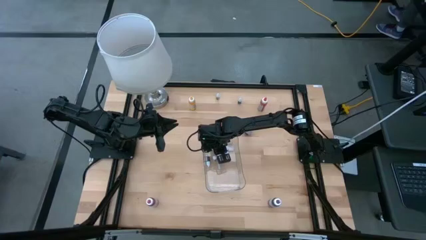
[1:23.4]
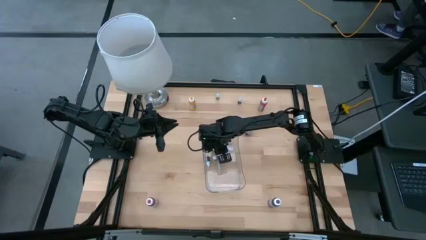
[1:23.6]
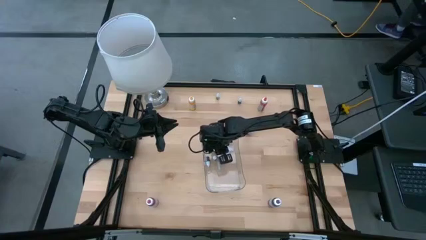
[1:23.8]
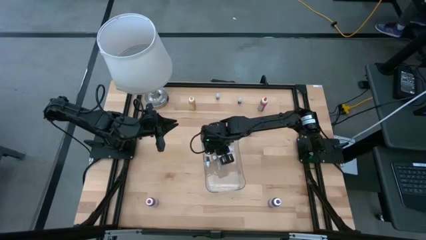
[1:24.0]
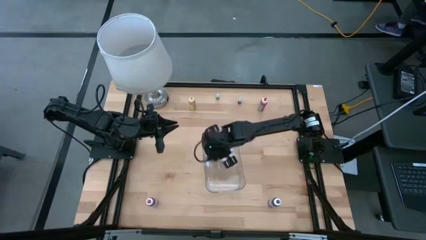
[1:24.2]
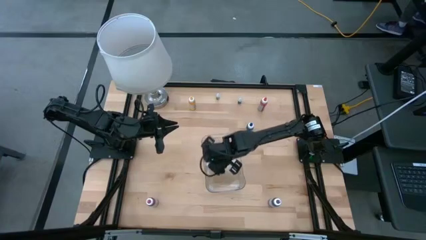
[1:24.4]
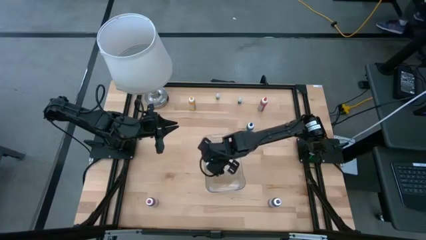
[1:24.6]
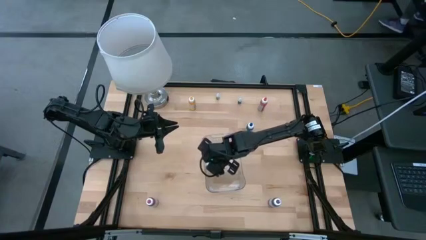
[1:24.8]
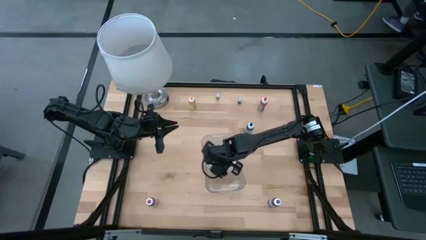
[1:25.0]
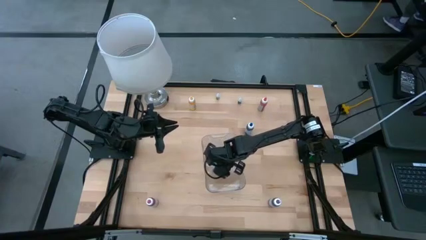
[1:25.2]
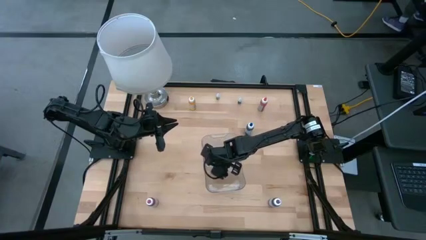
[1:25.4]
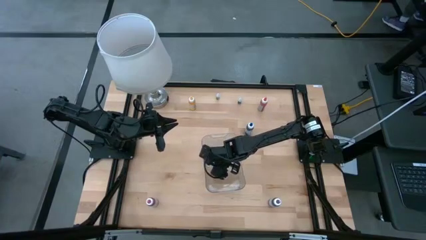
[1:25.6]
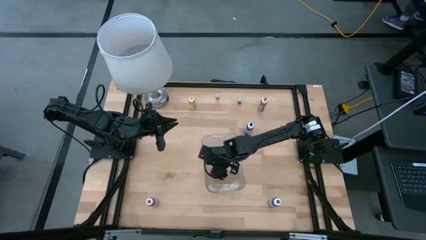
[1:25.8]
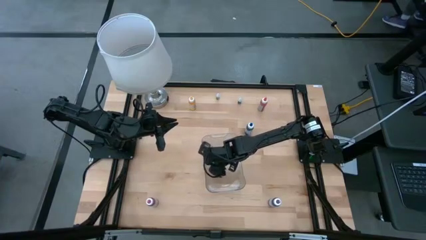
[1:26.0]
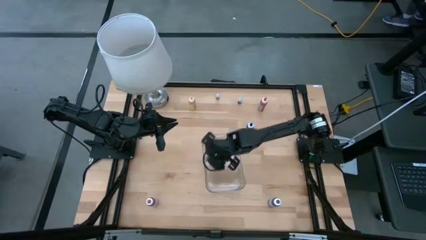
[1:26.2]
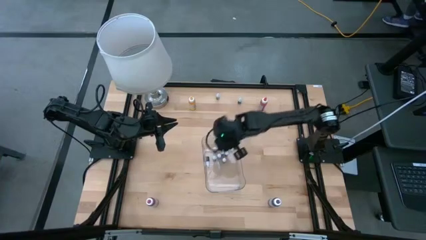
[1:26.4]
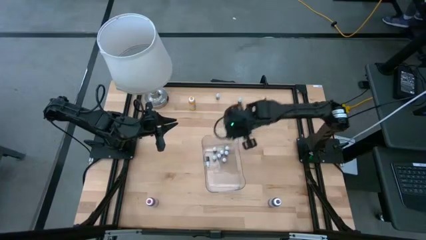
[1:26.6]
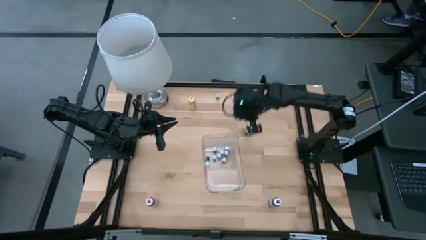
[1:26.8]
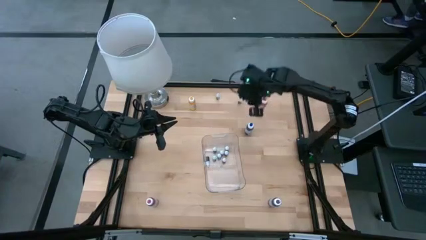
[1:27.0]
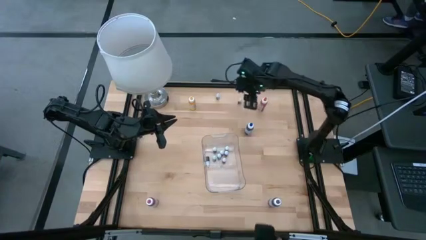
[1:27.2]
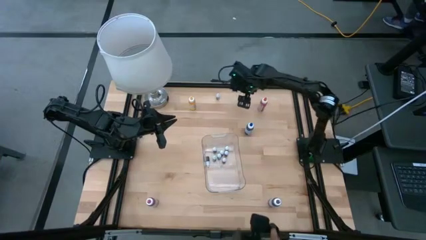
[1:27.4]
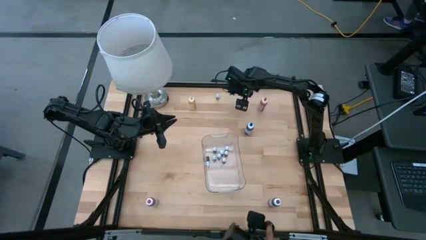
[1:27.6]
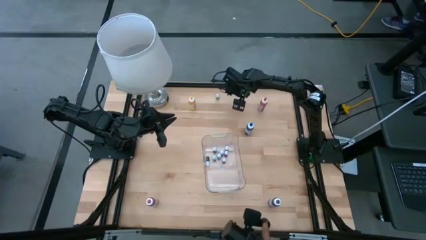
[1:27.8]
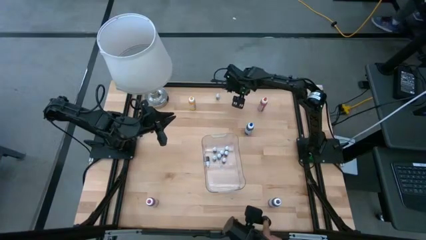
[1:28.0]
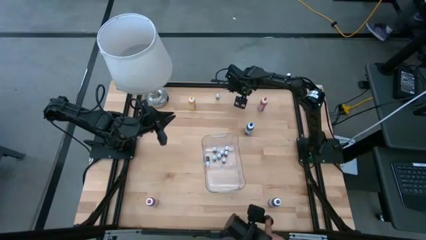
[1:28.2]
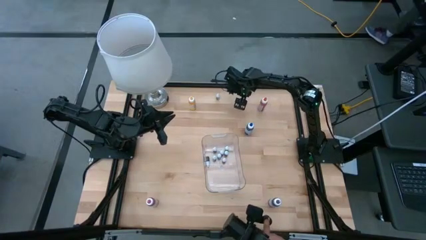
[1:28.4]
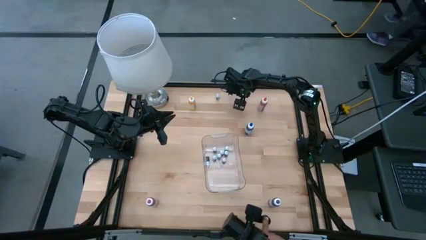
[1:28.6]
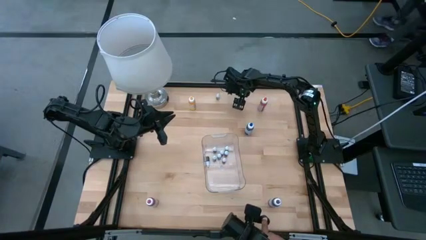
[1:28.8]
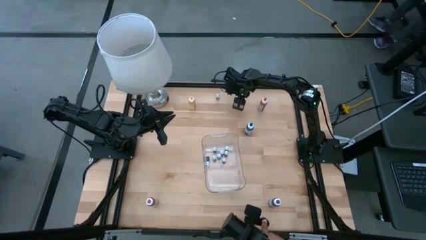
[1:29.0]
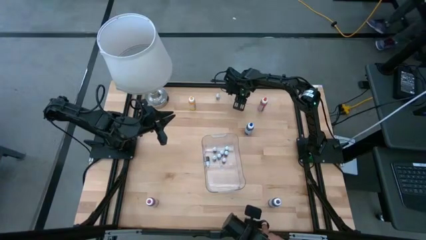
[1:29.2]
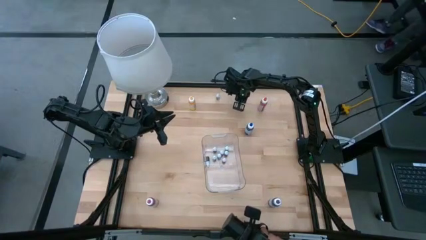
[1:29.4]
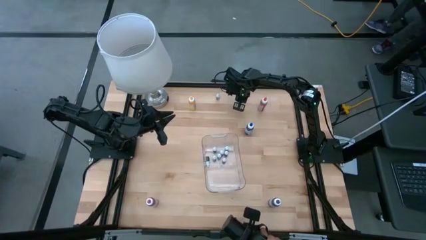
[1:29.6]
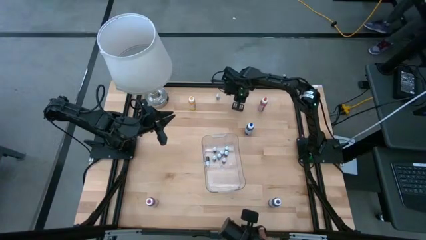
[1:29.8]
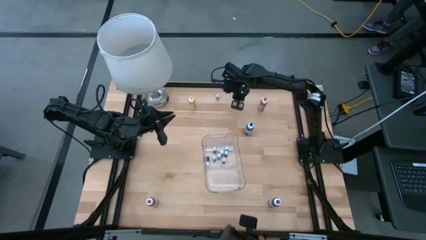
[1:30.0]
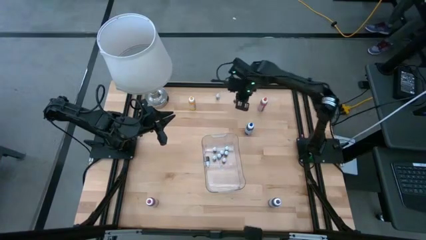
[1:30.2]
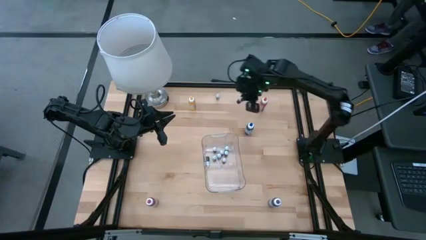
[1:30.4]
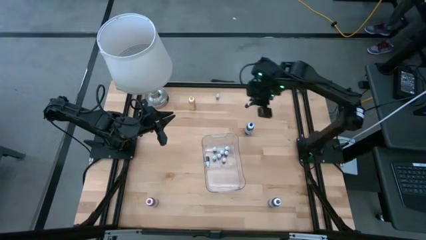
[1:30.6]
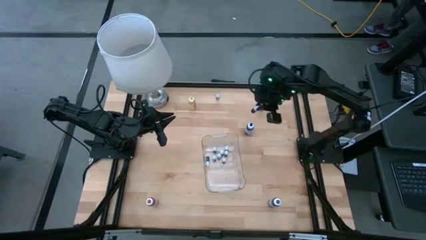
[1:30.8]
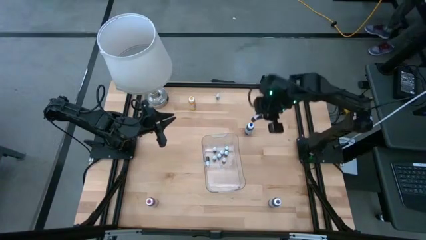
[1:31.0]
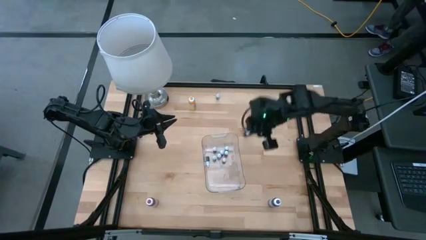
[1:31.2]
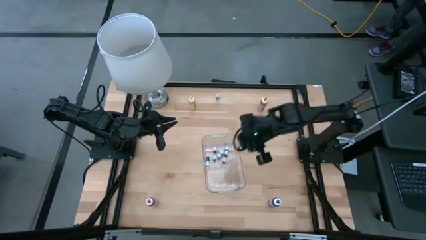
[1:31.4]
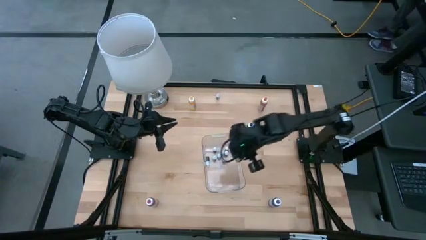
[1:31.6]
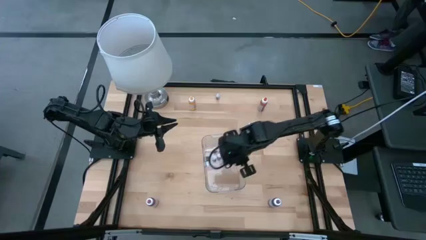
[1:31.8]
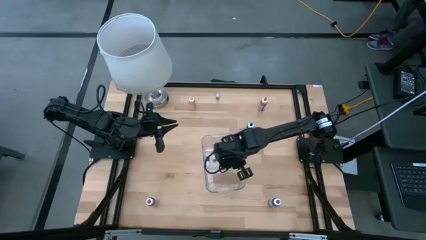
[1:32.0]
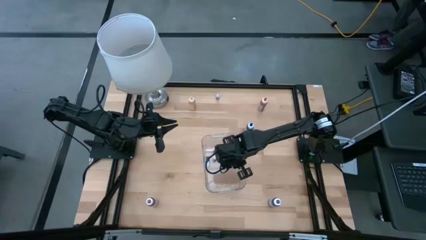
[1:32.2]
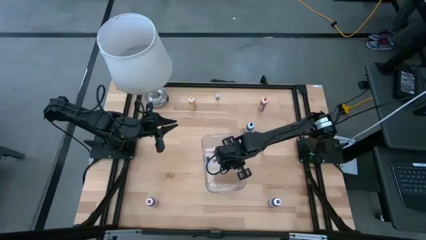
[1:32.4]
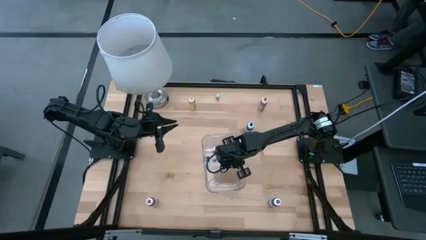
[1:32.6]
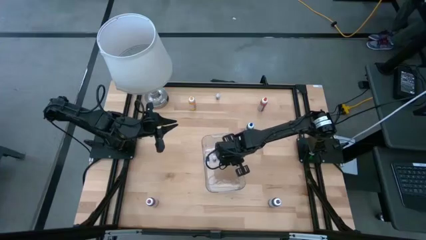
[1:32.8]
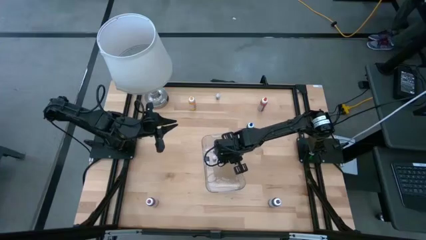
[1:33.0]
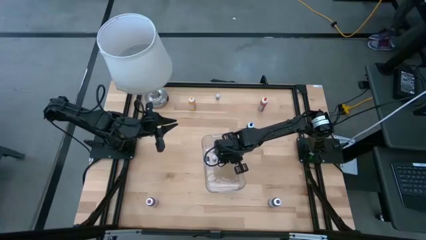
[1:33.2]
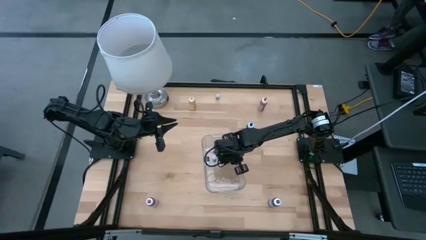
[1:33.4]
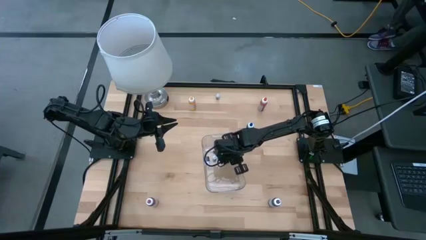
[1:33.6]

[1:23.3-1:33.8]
Task: Pick & Place food coloring
Put the small blue food coloring bottle into the transparent container

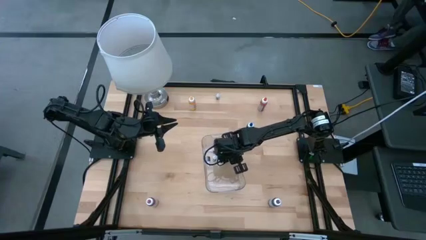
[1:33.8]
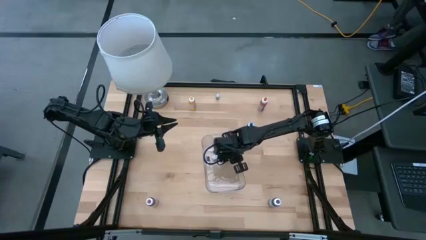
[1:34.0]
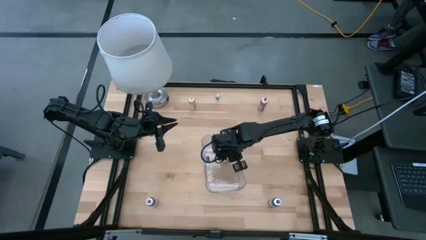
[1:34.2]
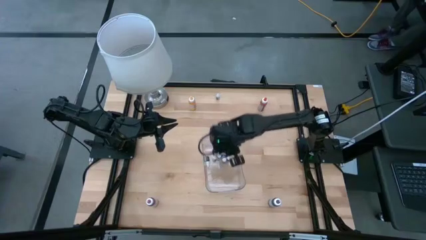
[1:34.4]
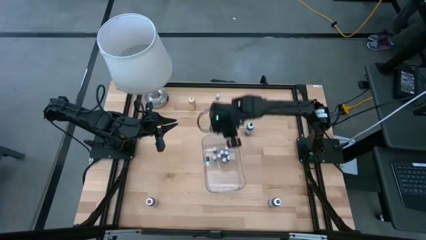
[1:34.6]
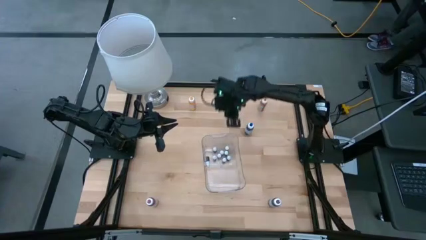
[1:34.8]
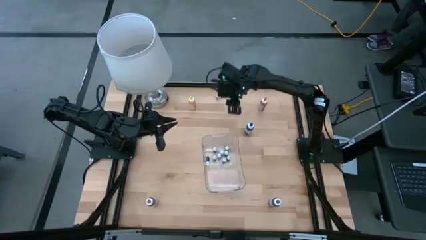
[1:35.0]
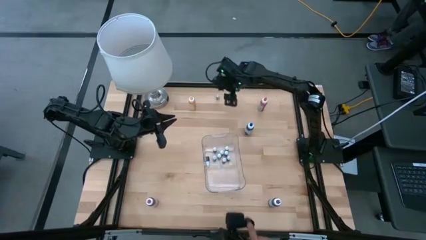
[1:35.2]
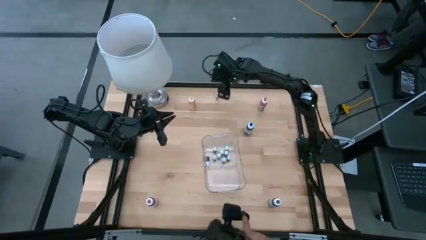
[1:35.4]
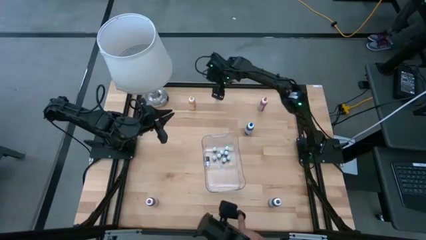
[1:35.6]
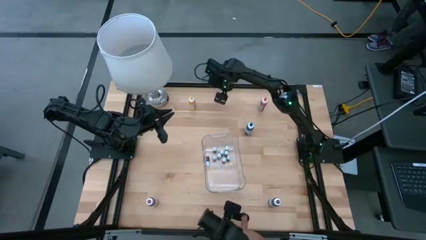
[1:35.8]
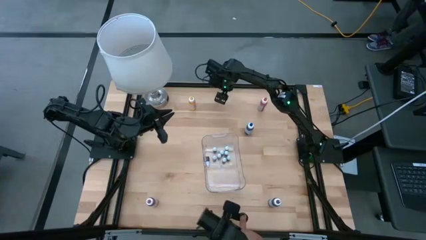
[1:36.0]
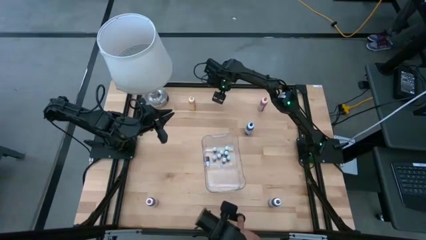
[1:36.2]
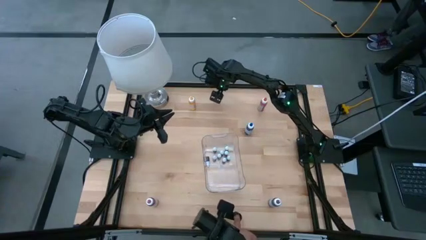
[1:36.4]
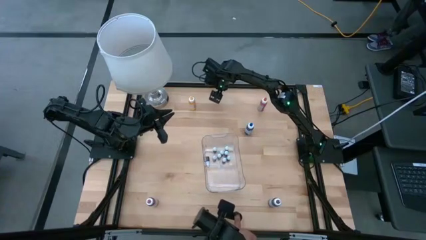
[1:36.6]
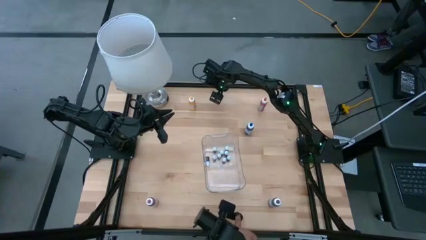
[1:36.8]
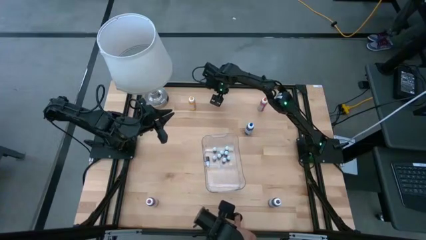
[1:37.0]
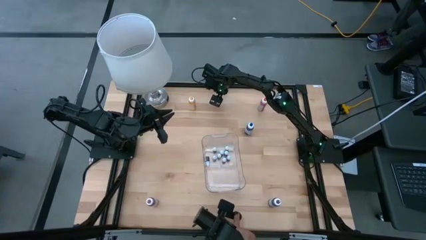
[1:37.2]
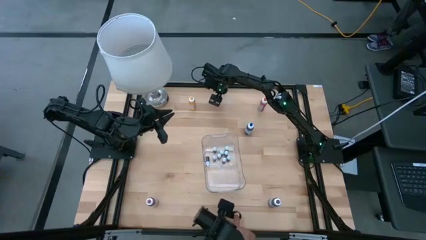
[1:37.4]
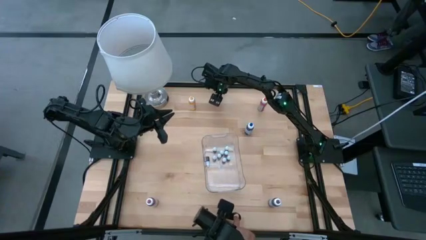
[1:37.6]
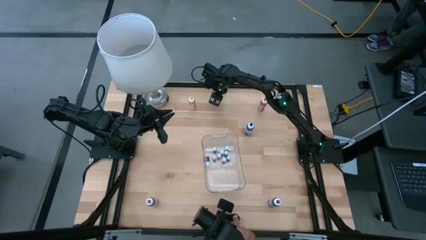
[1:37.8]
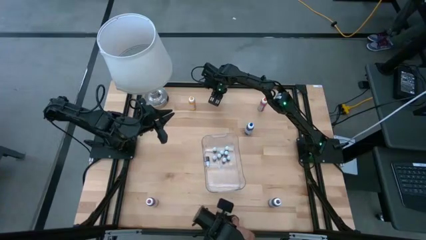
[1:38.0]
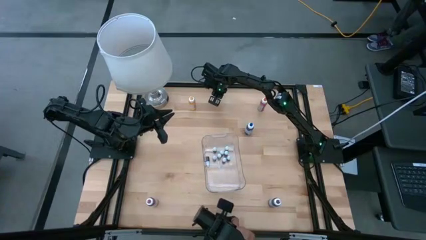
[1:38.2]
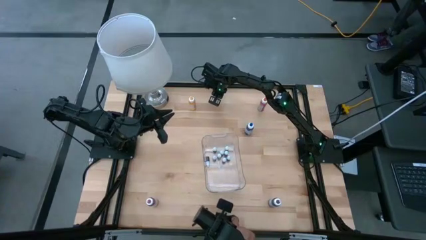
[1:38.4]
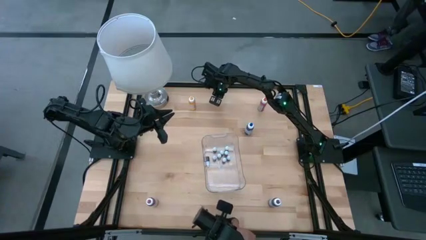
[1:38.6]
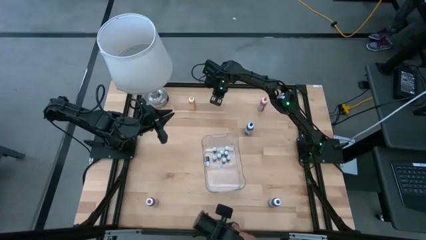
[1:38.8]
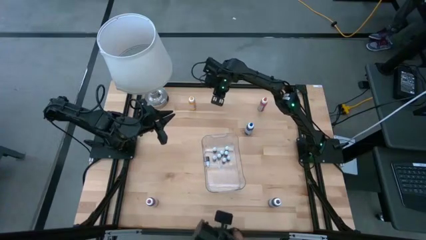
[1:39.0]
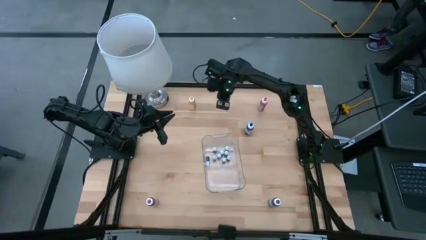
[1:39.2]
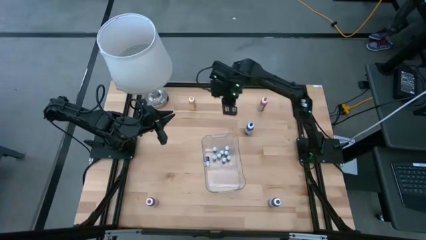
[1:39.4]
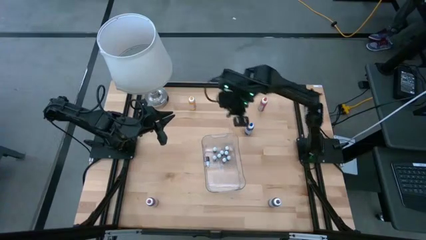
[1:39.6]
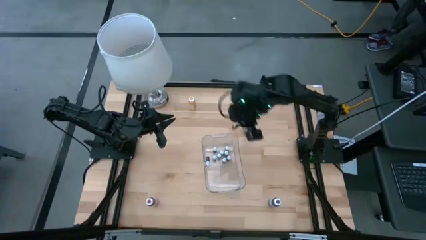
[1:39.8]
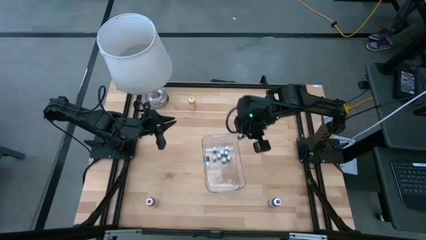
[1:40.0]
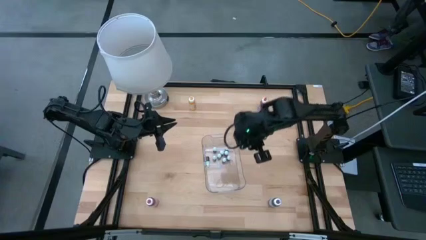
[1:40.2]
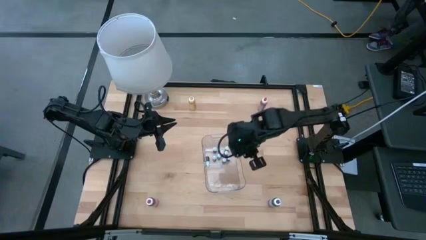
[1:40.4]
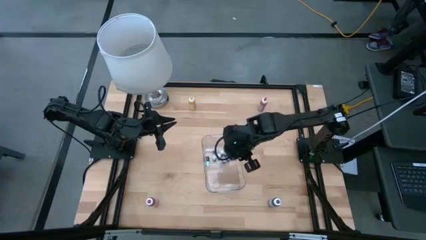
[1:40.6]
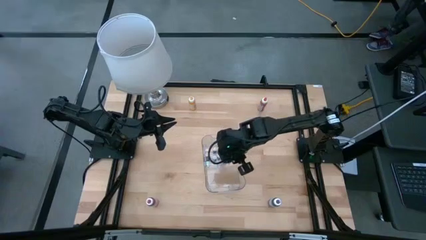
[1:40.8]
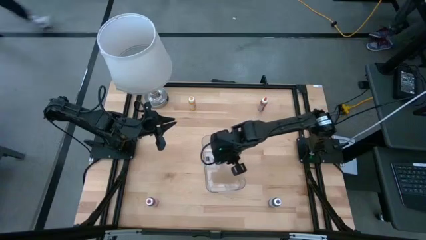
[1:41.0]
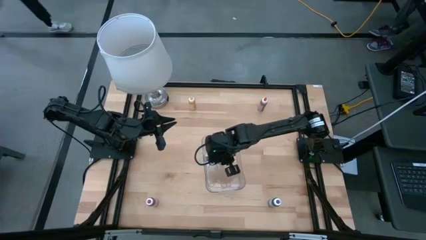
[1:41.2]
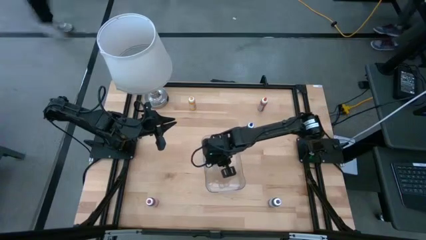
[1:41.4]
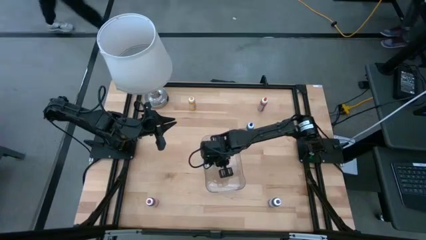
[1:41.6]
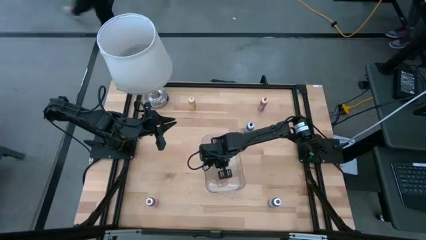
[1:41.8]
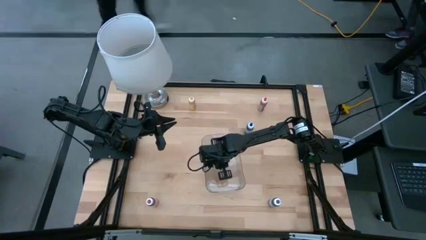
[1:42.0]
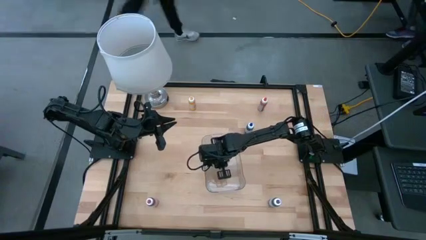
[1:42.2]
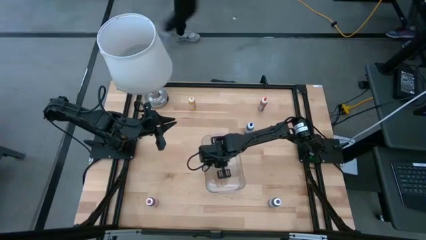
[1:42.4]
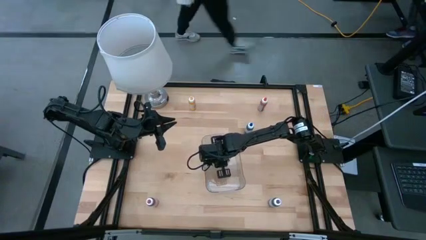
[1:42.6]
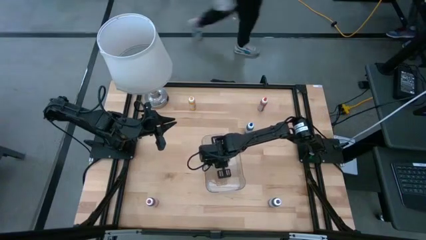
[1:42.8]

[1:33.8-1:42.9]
Put the small green food coloring bottle into the transparent container
